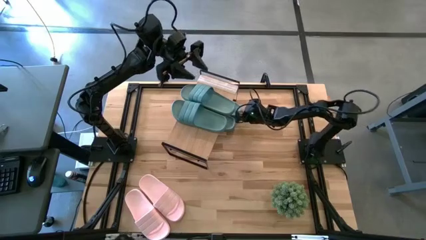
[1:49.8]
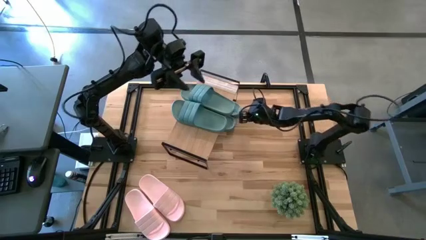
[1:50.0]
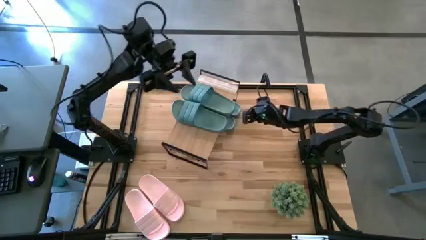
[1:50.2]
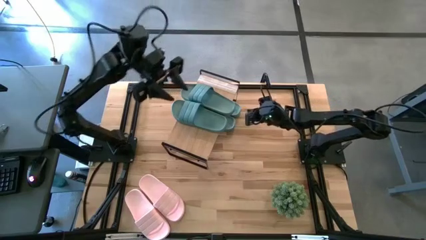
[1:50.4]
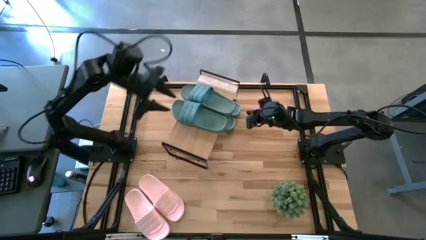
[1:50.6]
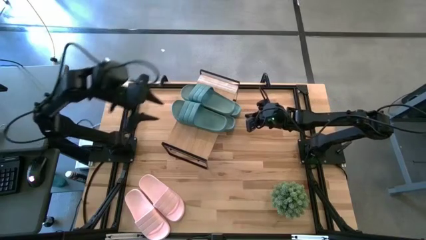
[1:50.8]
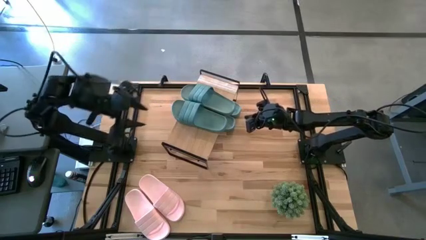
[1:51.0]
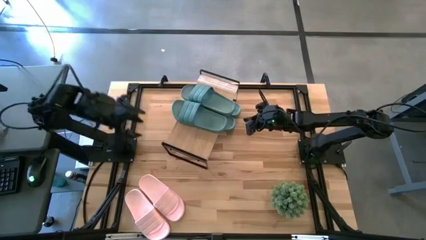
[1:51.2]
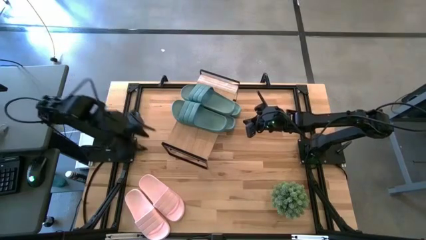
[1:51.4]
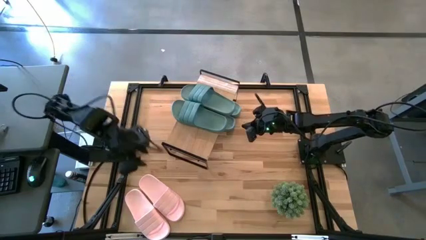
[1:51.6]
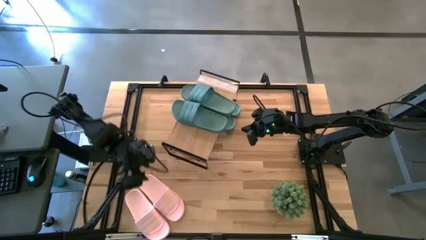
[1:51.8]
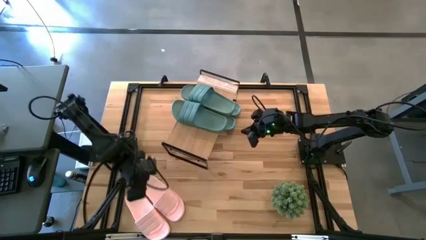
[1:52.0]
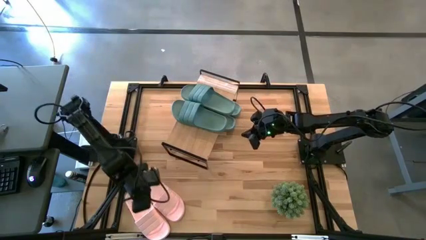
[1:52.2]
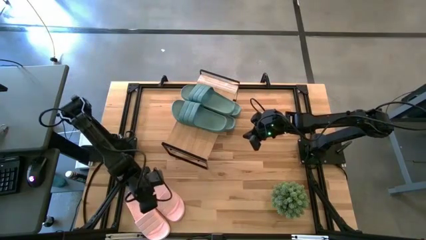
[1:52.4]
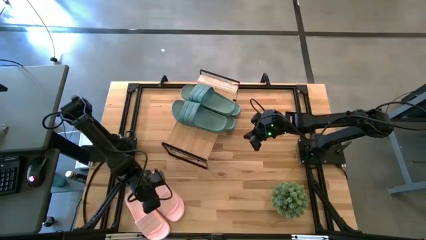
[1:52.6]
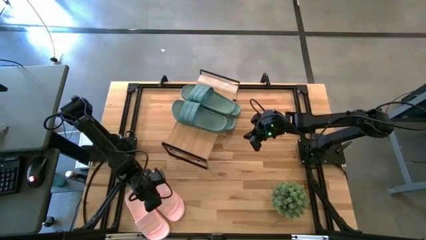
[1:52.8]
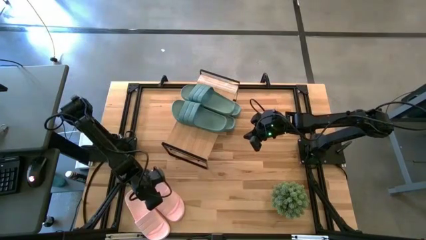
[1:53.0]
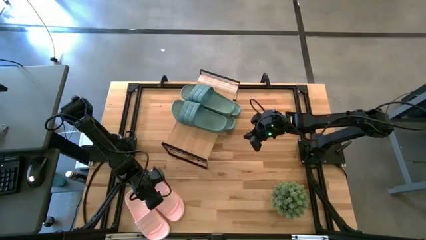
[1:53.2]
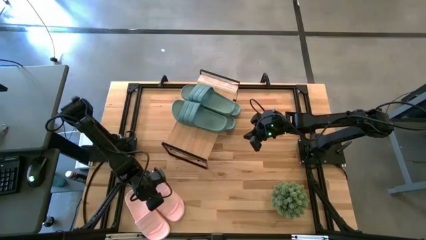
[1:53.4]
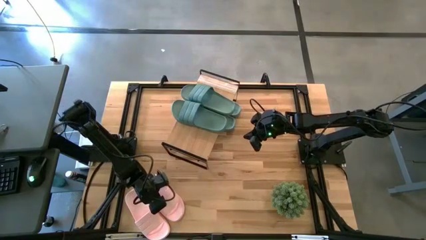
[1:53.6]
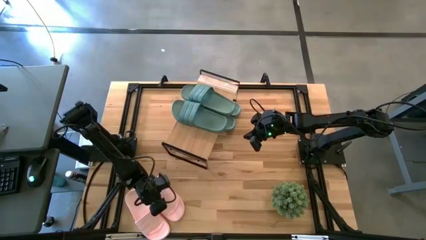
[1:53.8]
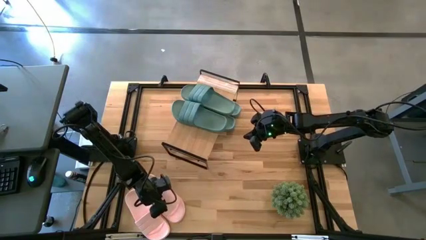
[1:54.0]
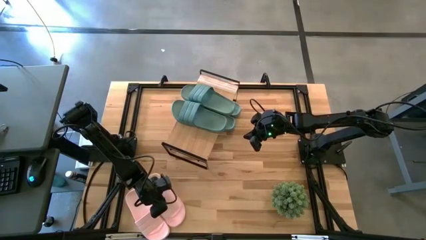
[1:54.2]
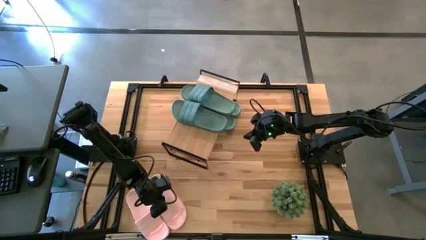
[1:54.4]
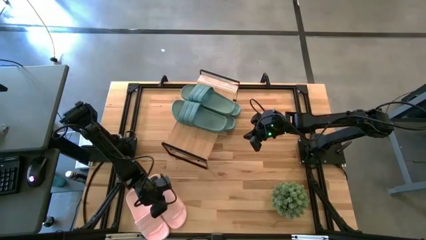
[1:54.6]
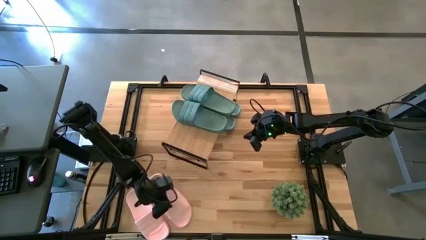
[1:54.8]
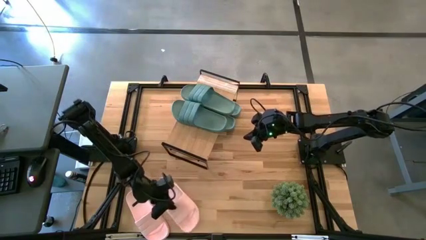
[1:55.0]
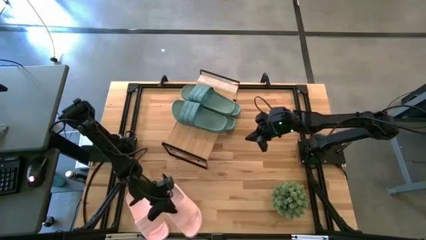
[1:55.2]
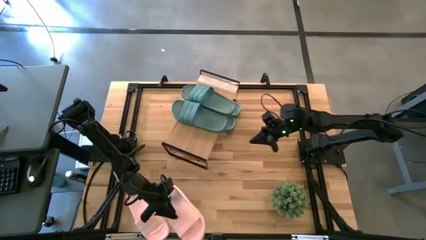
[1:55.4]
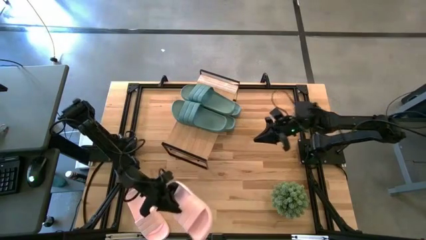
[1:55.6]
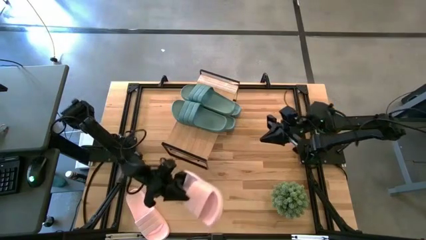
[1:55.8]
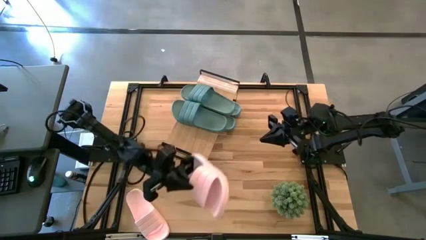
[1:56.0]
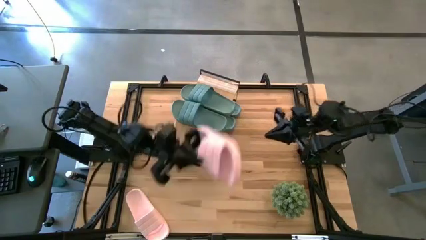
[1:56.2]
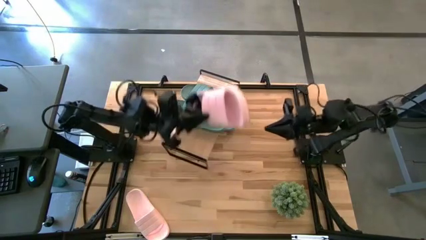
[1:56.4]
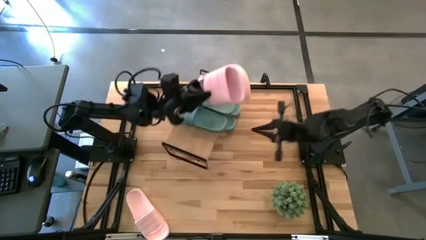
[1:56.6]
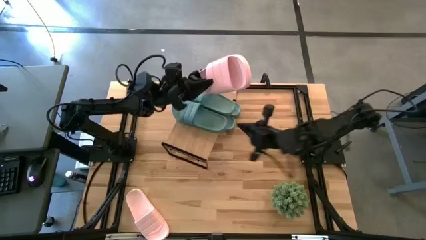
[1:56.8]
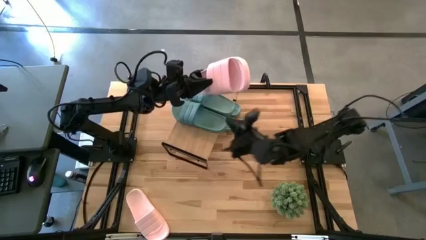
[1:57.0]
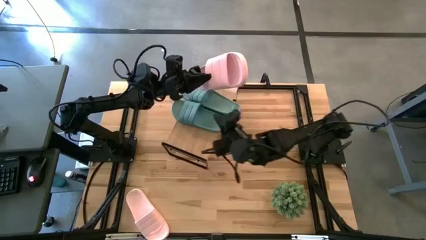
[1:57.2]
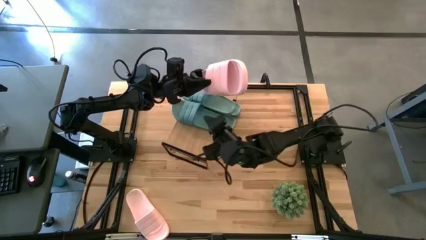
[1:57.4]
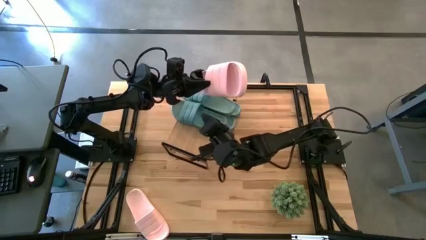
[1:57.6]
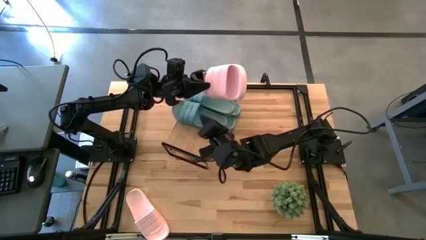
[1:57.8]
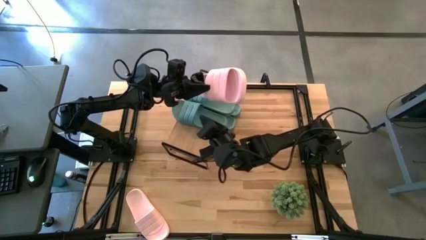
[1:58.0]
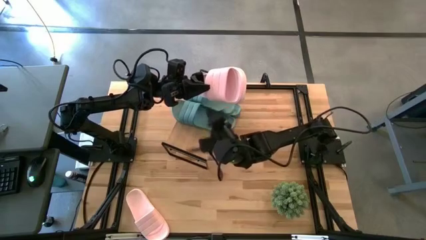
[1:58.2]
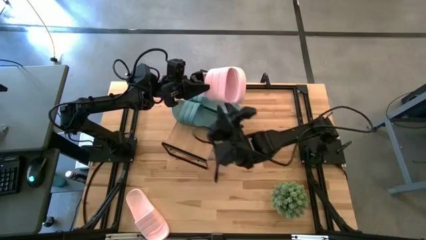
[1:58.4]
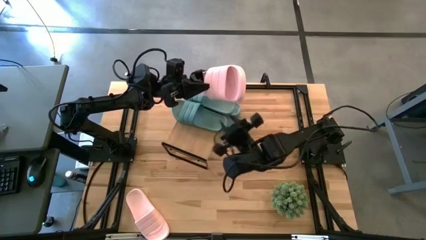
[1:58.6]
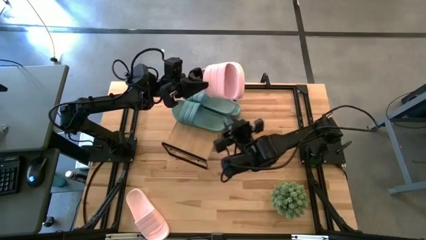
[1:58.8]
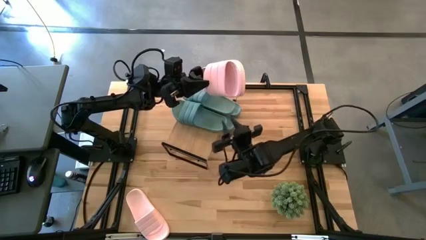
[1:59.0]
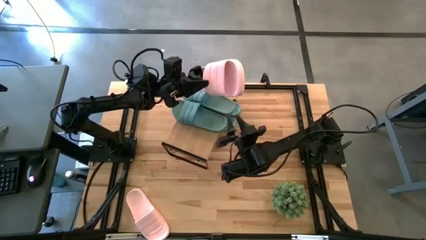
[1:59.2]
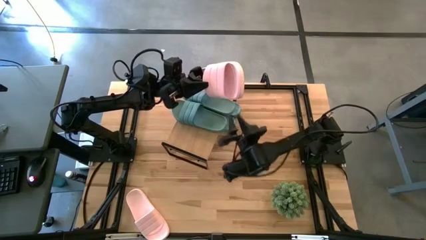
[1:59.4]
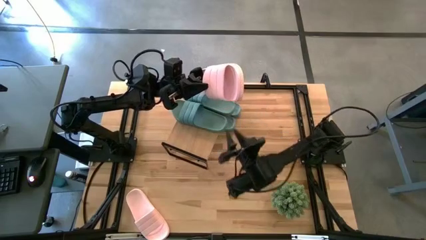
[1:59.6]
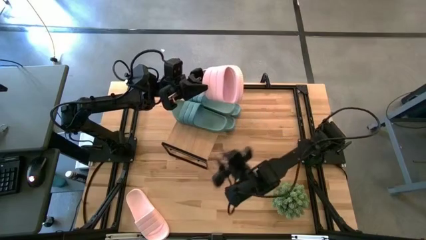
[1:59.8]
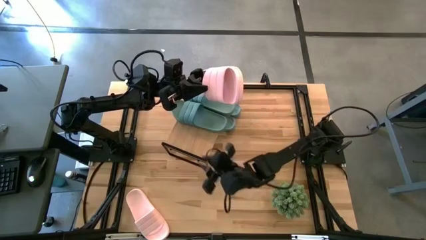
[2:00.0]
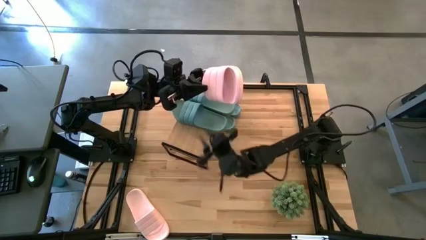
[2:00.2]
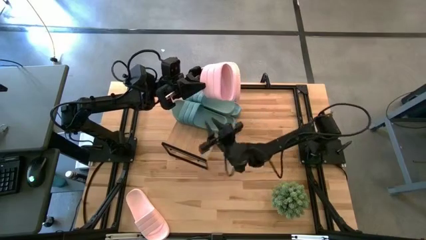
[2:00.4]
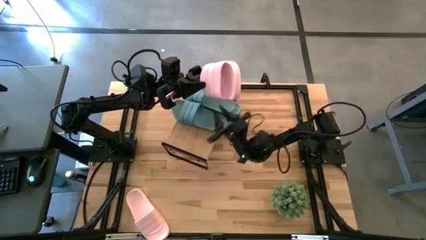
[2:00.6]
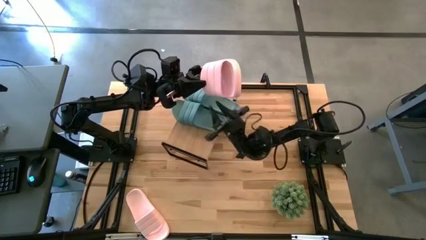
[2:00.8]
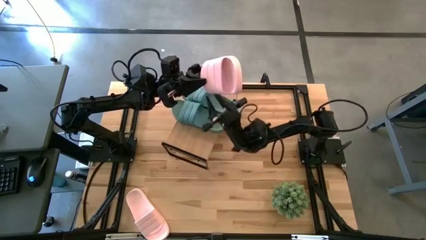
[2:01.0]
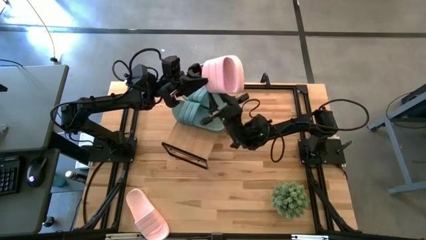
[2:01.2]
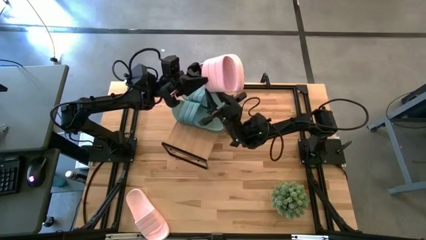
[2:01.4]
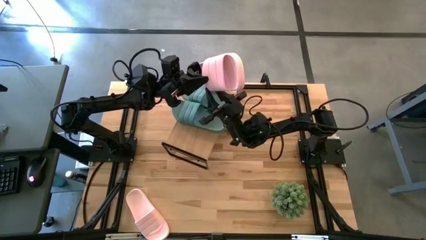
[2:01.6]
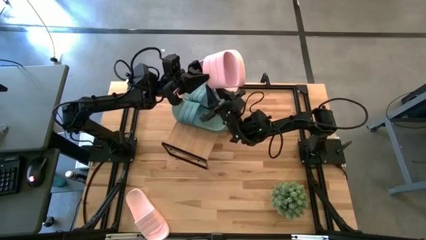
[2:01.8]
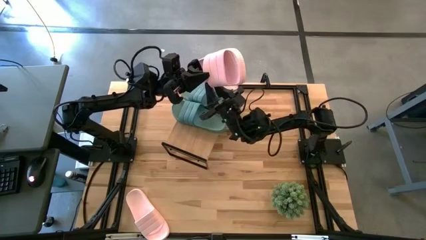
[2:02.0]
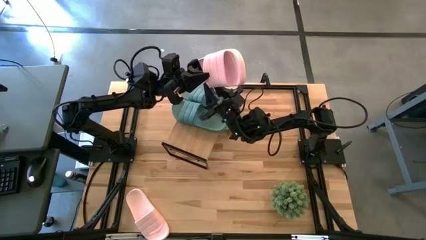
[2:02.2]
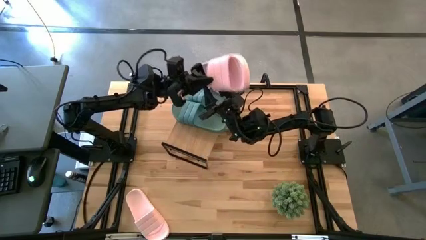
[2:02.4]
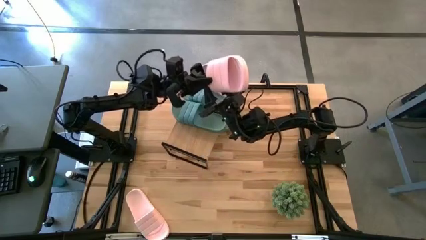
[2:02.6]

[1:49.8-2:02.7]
Task: Pick and place slides into the shelf
Put the pink slide under the shelf

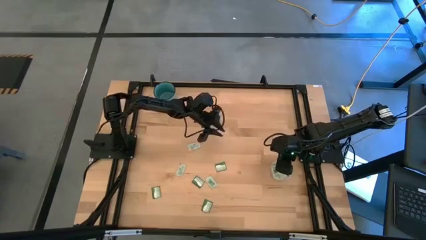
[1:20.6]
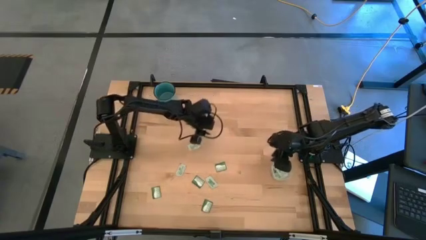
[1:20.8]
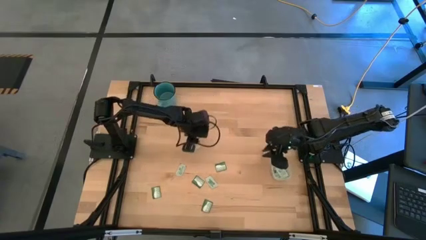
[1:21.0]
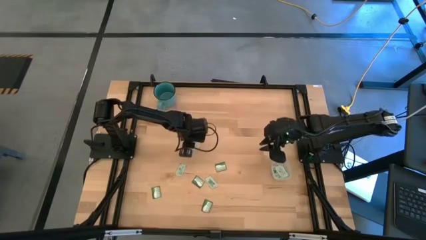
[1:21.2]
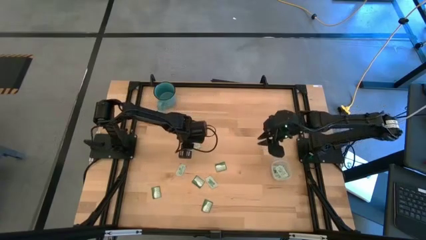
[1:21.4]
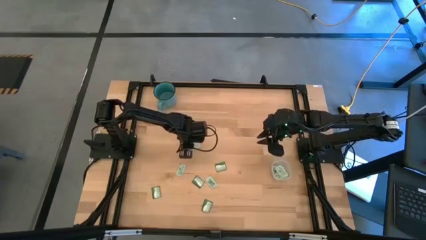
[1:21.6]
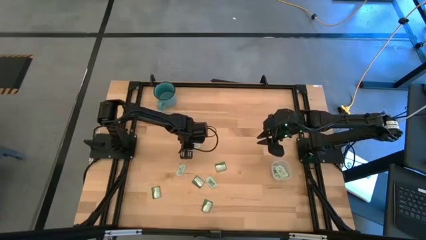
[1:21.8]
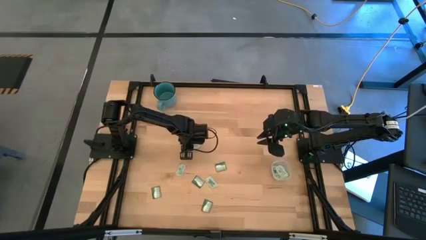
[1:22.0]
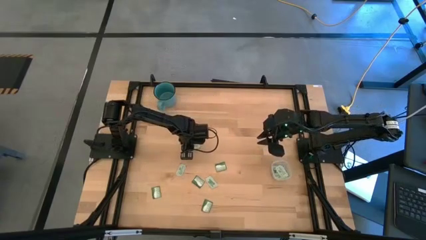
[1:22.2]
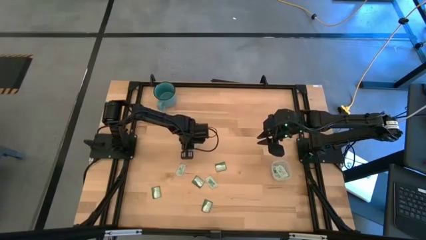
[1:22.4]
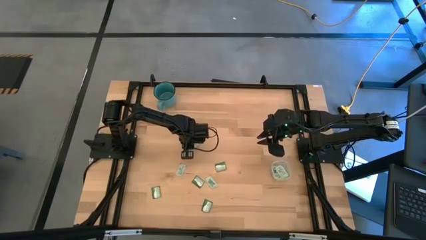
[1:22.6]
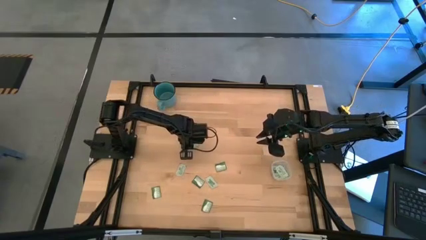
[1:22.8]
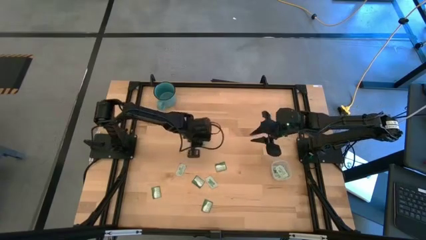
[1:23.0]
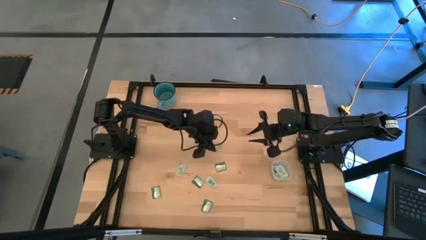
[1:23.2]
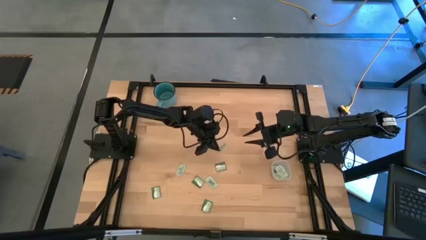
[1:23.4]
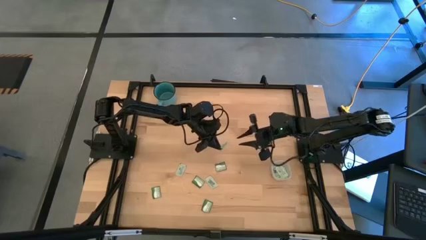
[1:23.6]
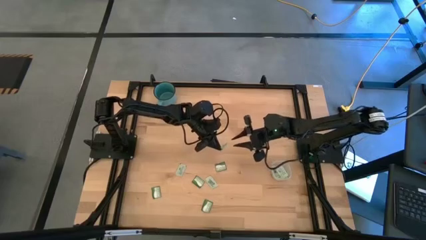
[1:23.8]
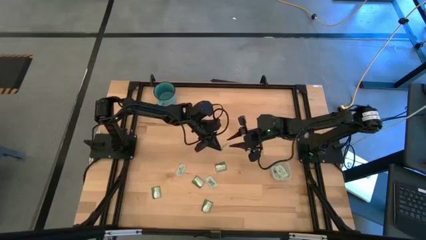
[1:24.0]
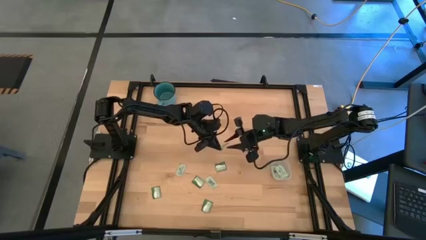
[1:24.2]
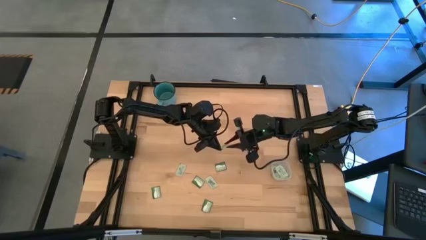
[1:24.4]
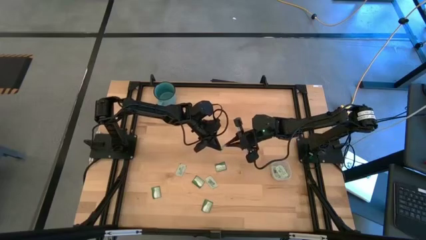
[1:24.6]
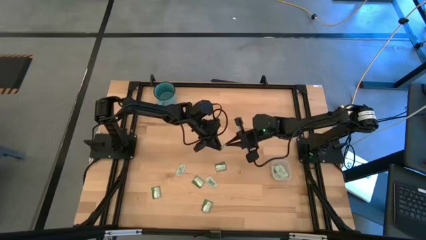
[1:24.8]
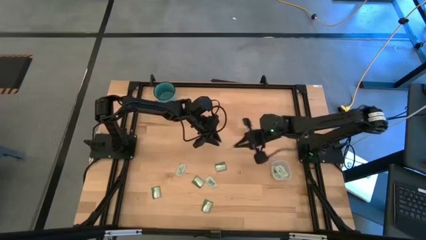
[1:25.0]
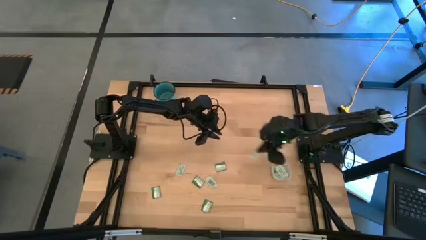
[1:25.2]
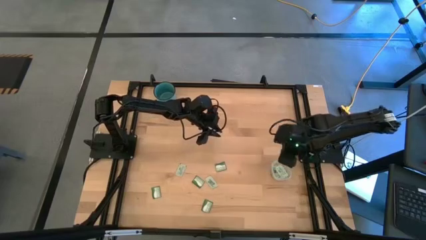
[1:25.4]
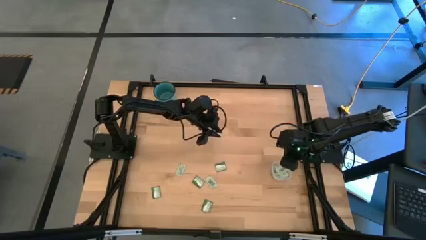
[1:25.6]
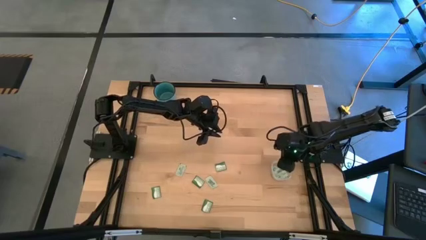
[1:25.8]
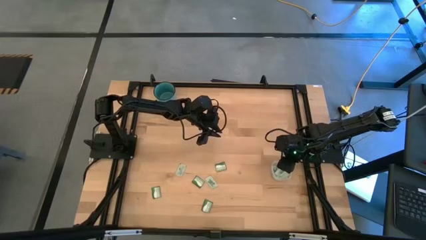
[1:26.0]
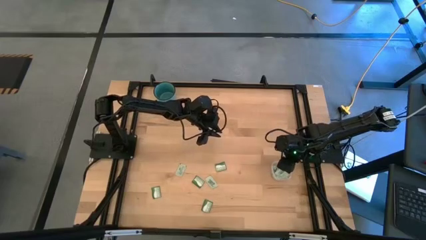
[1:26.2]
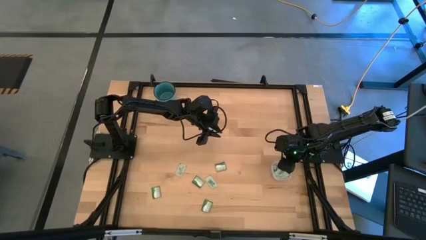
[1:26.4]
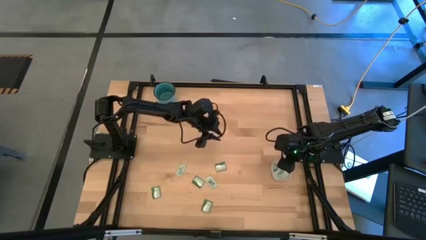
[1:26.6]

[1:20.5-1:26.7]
Task: Pick and place items into bin
Put the white stevia packet into the transparent bin
